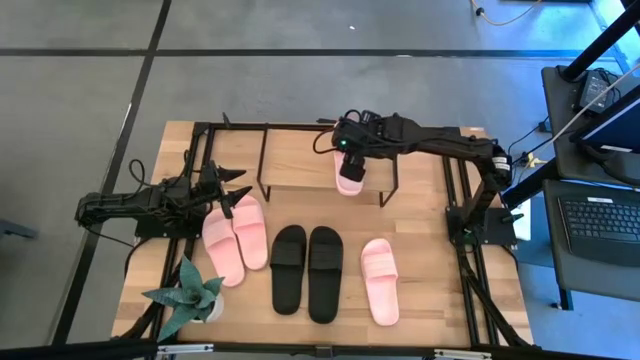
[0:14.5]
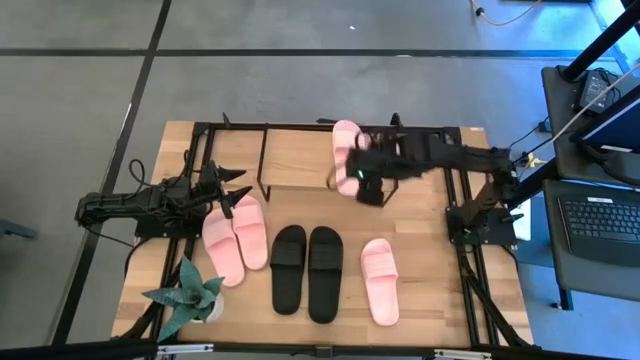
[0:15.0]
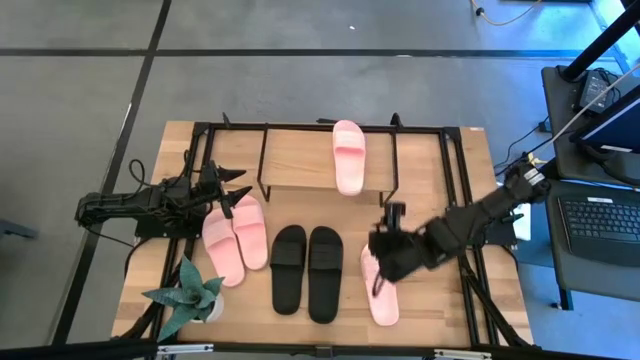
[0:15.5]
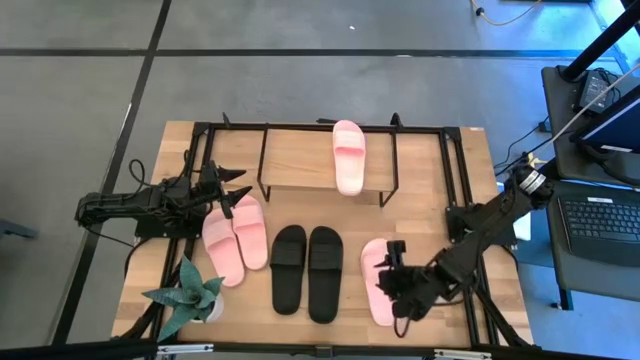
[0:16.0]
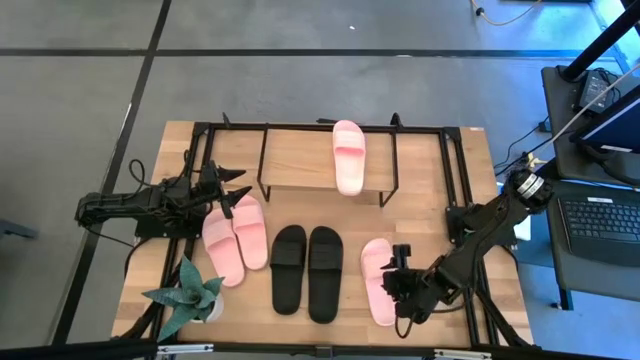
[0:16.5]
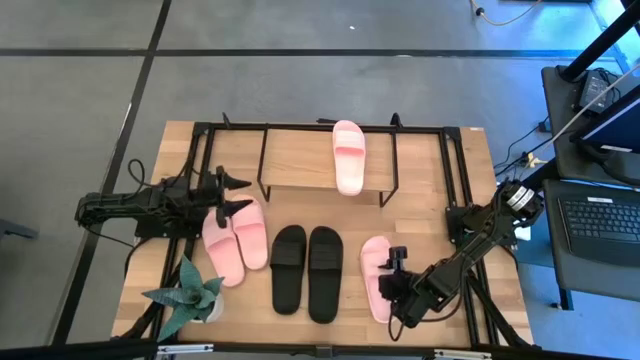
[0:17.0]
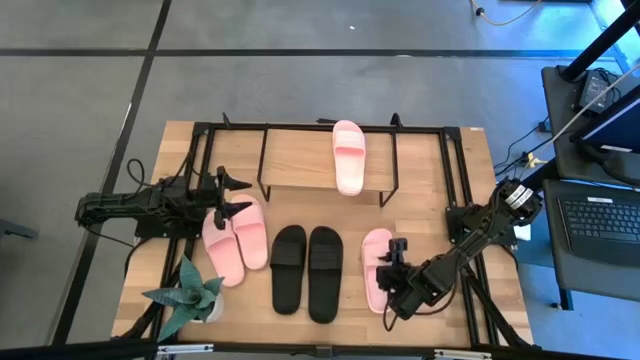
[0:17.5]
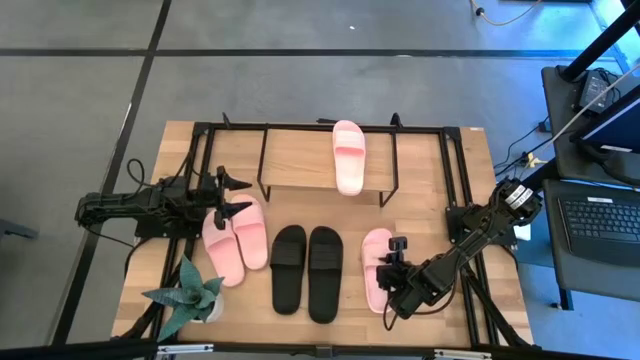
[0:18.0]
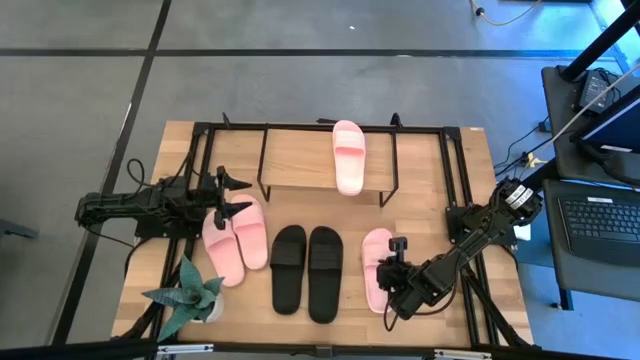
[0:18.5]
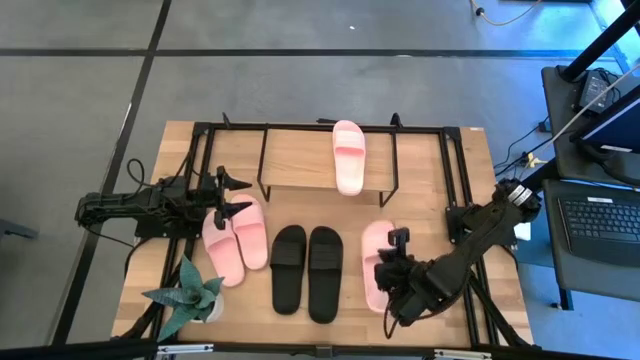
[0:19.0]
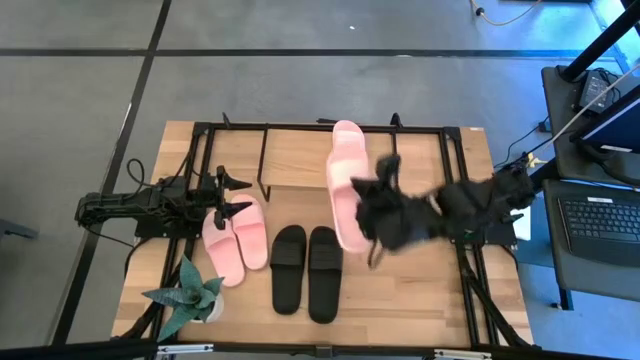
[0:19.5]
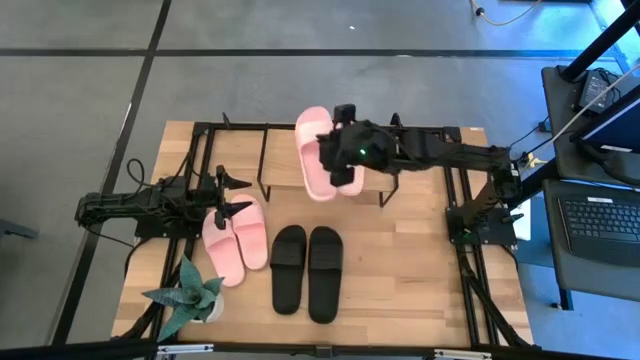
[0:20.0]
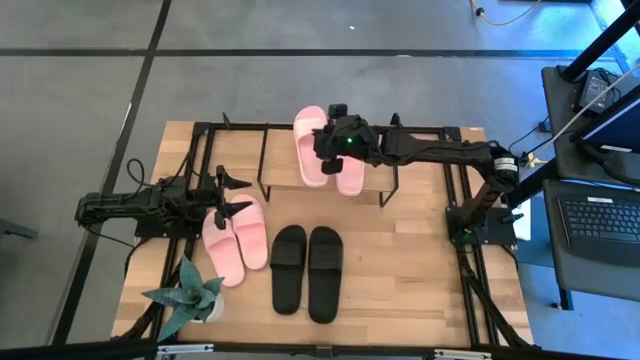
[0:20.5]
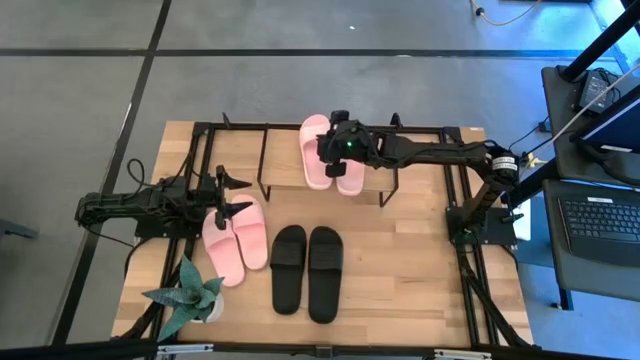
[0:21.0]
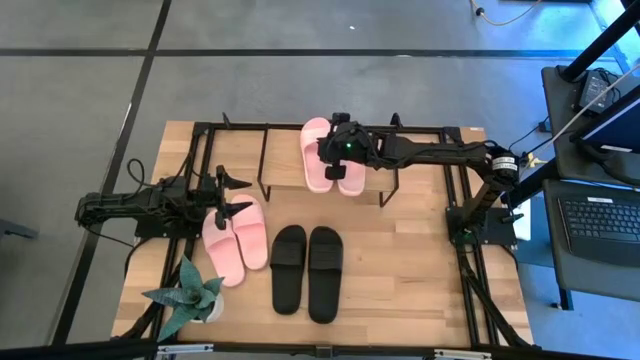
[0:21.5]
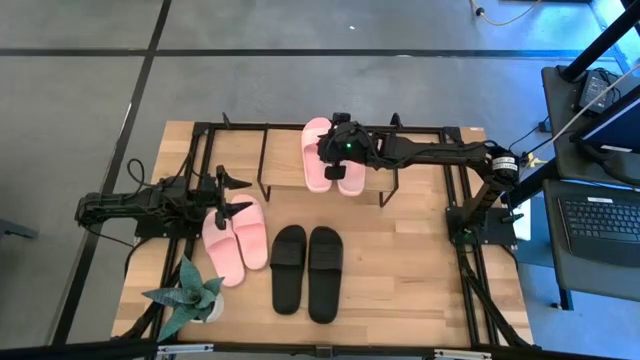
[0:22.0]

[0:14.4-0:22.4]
Task: Pick and place slides into the shelf
Put the pink slide on the shelf

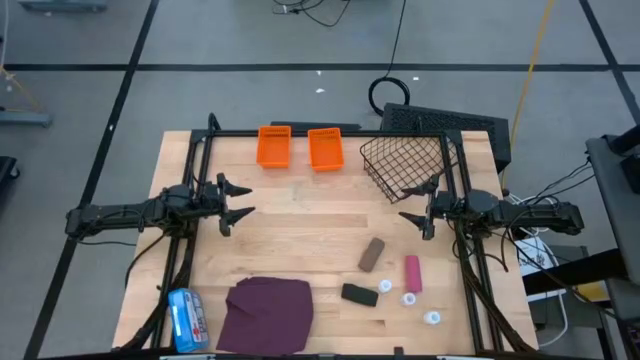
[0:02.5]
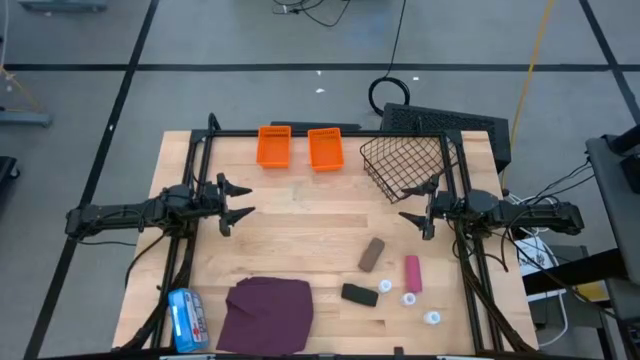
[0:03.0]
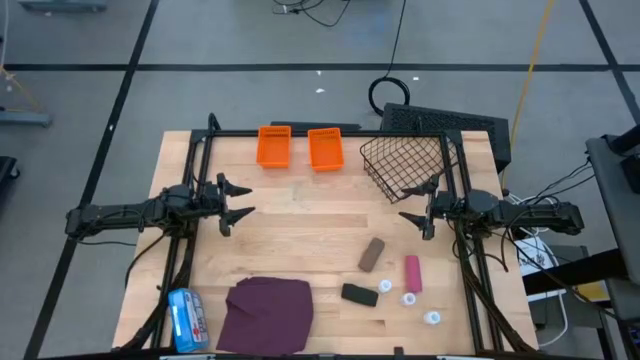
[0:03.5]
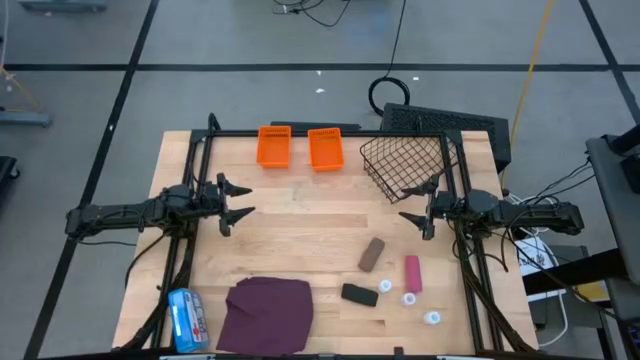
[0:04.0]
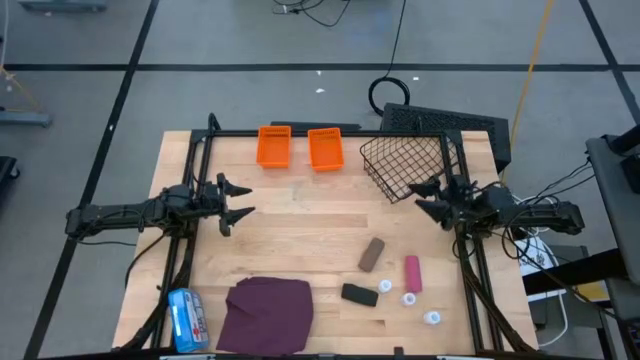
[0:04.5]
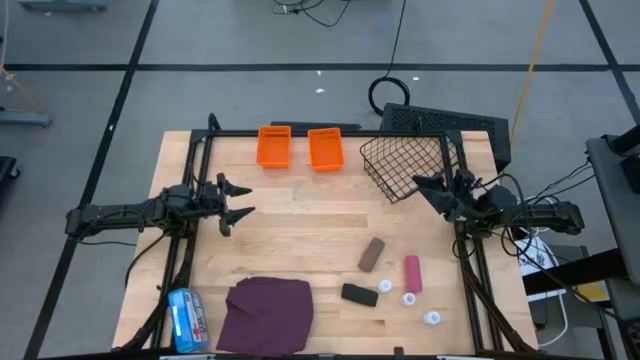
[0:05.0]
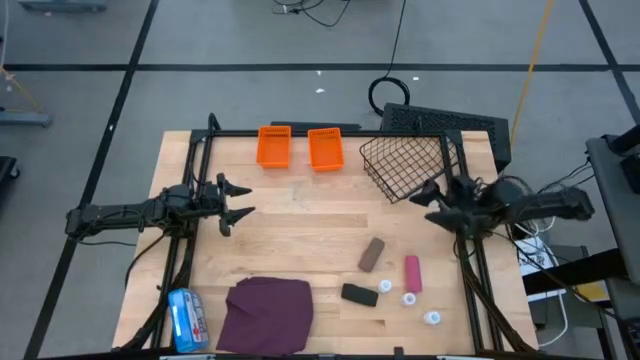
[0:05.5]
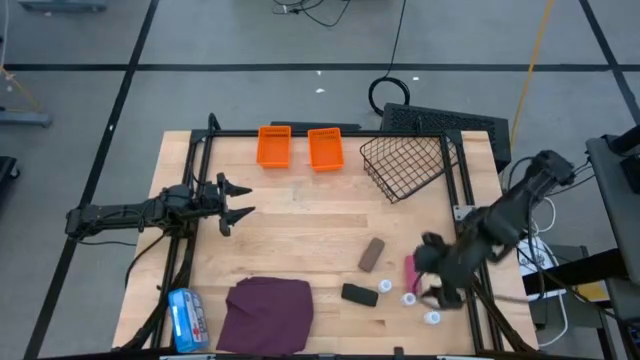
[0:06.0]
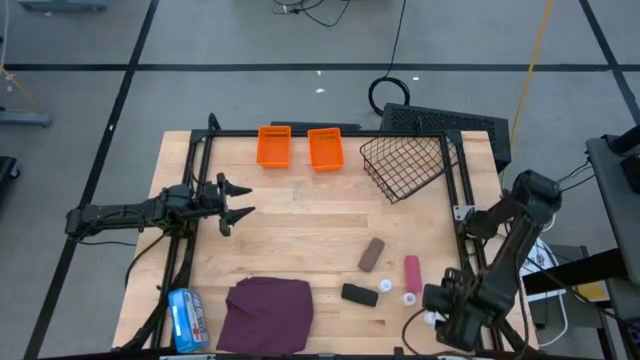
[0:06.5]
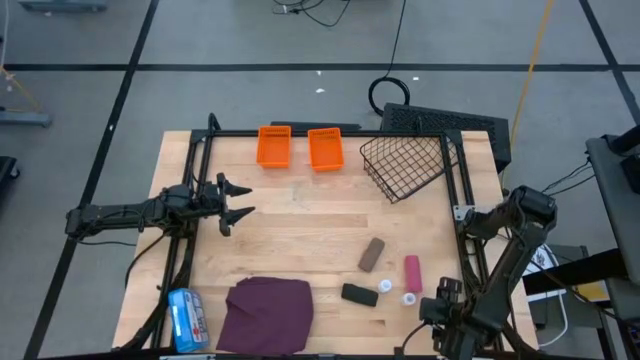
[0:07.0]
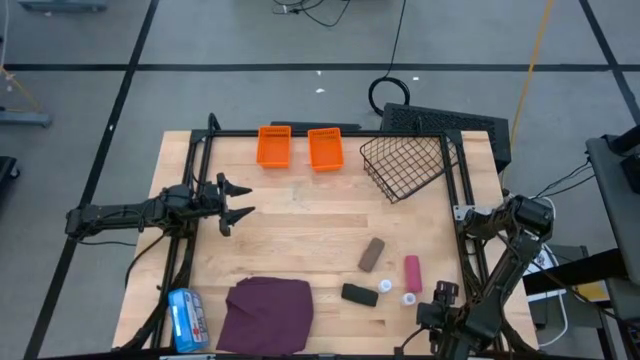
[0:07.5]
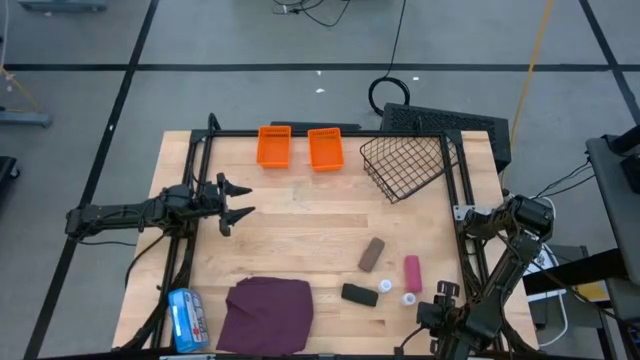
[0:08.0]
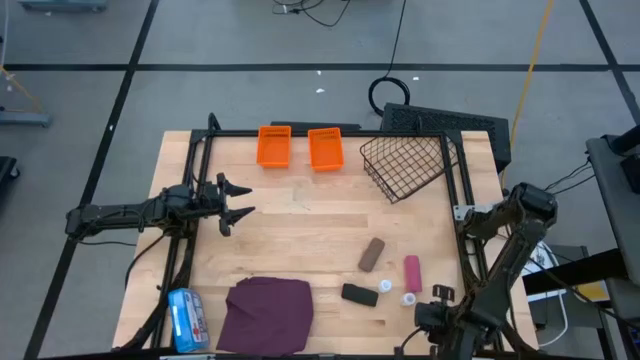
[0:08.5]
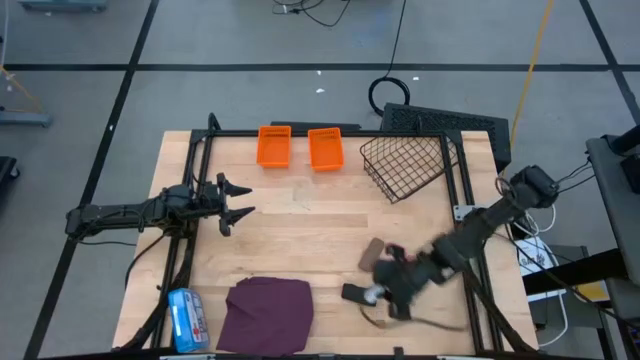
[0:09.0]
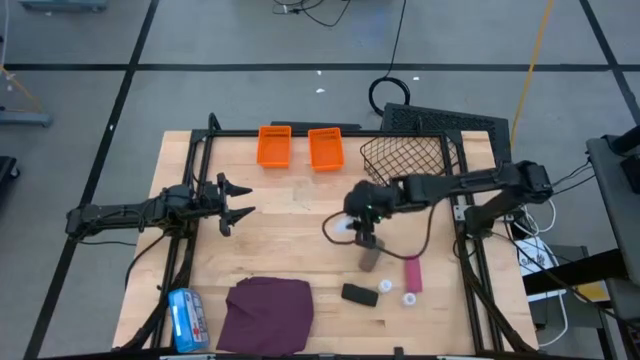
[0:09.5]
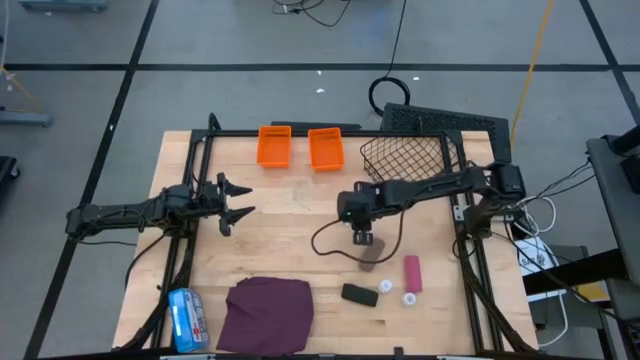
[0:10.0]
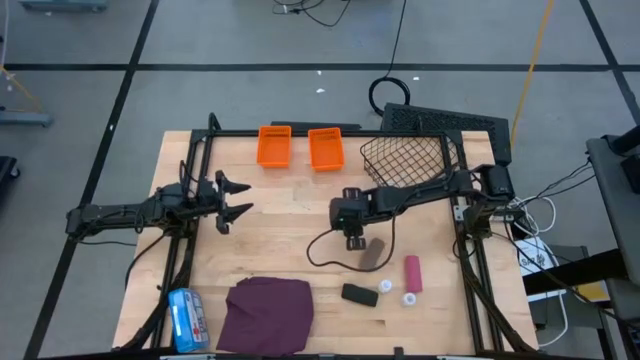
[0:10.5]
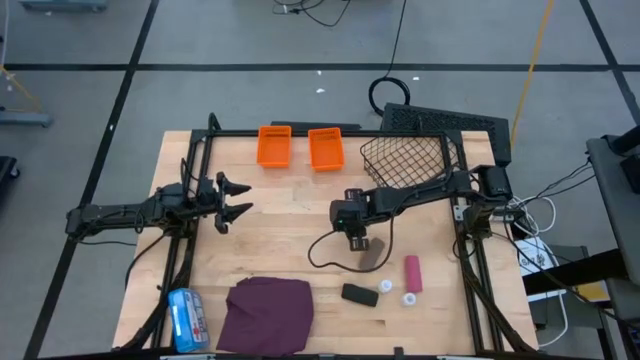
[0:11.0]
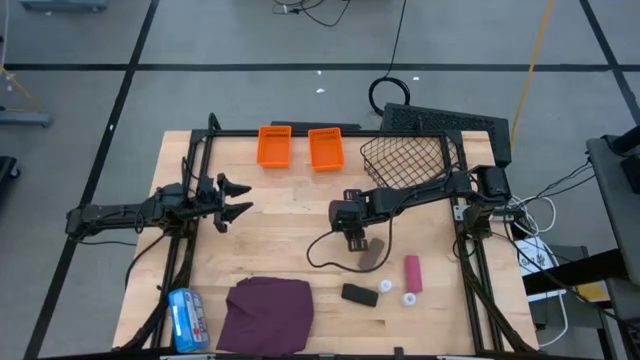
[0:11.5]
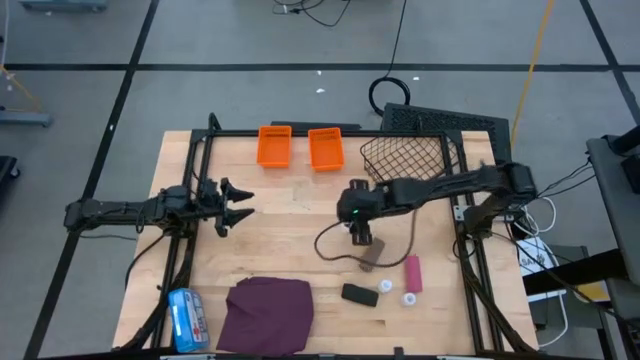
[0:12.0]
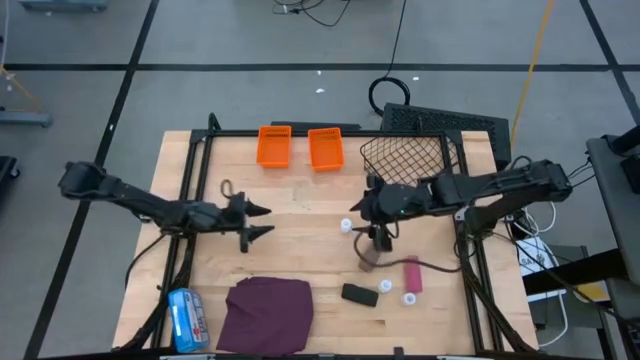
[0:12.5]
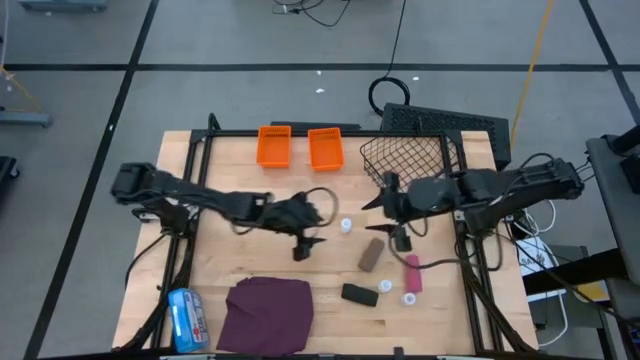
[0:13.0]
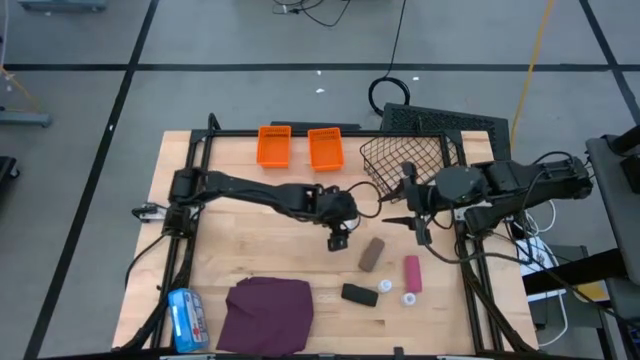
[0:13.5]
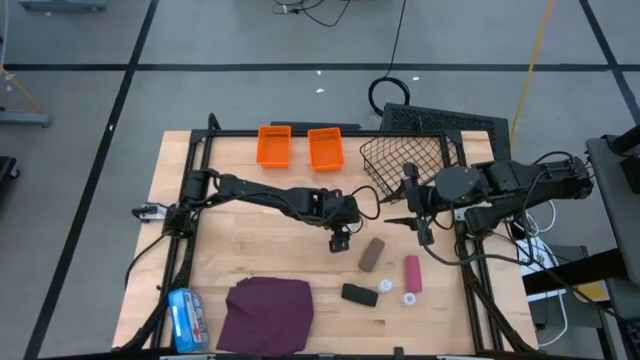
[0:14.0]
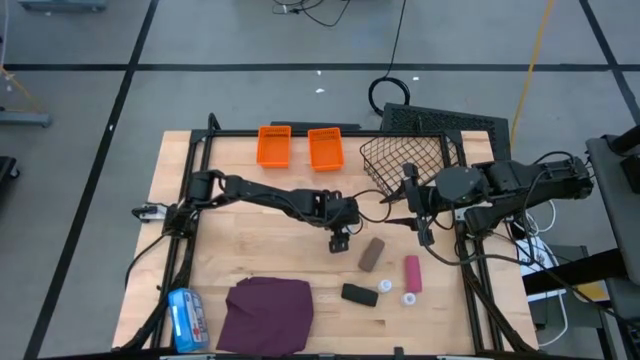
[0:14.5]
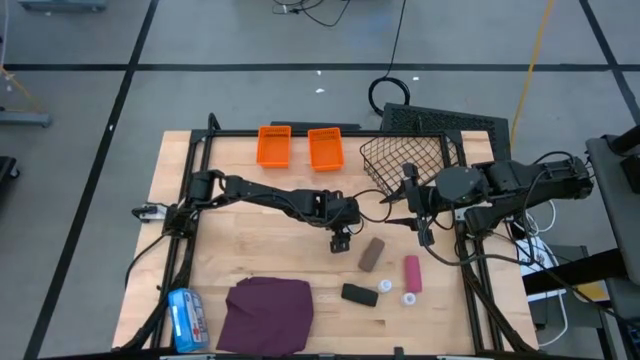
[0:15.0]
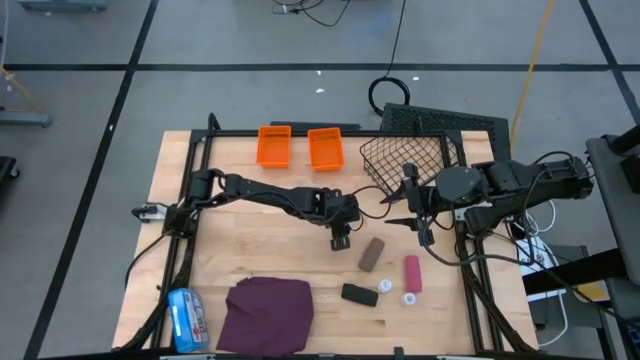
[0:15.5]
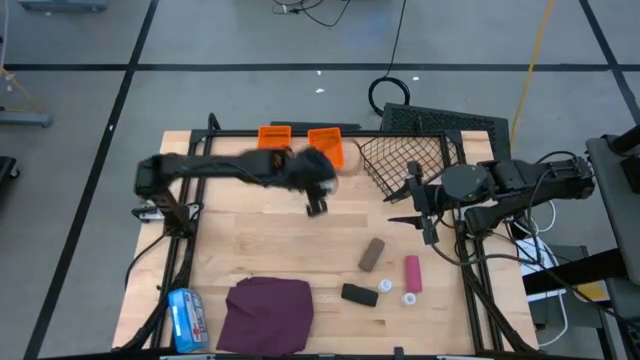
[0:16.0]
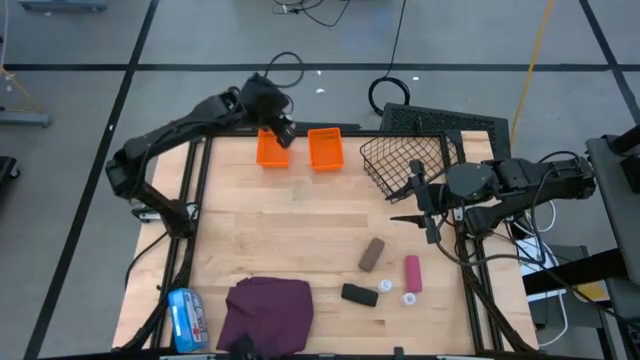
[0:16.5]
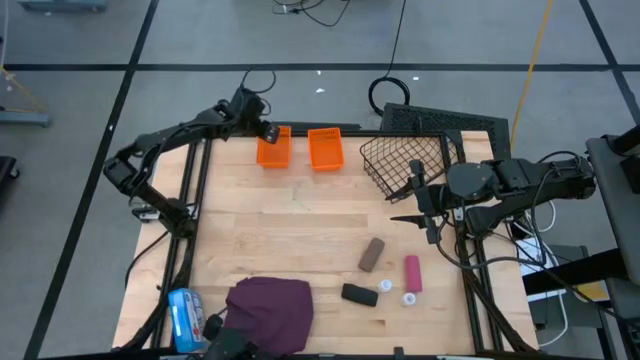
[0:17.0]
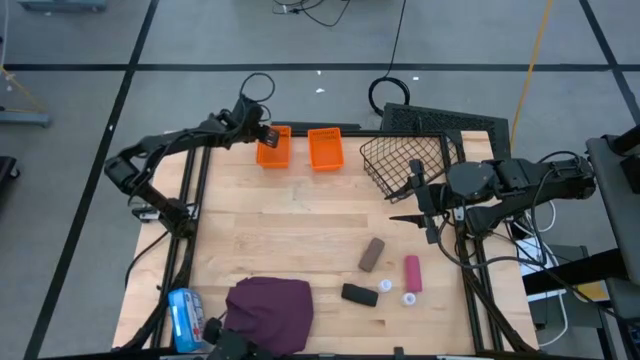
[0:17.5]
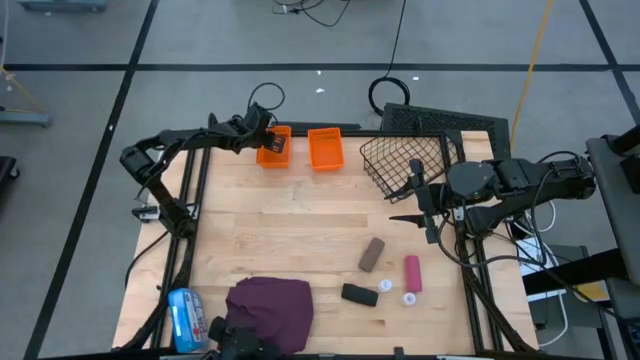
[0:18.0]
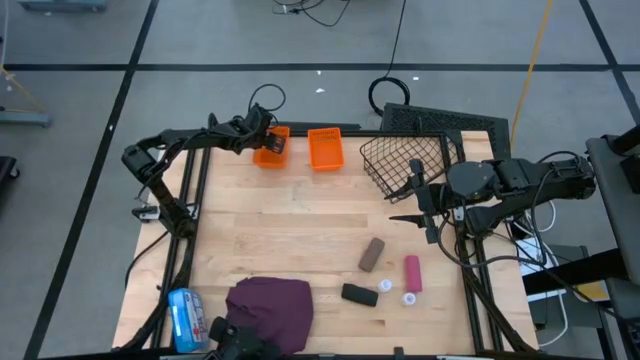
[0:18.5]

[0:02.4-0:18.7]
Task: Pick & Place Medicine items
Put the bottom transparent pill bottle into the left orange bin
